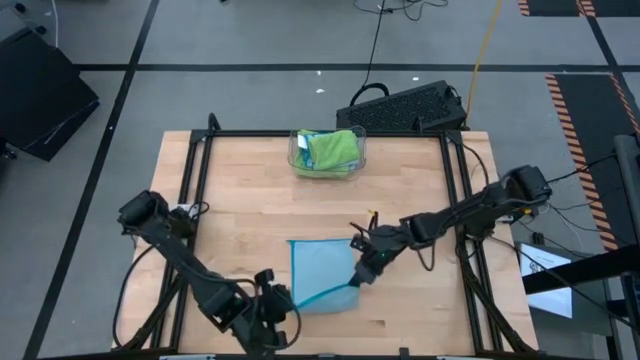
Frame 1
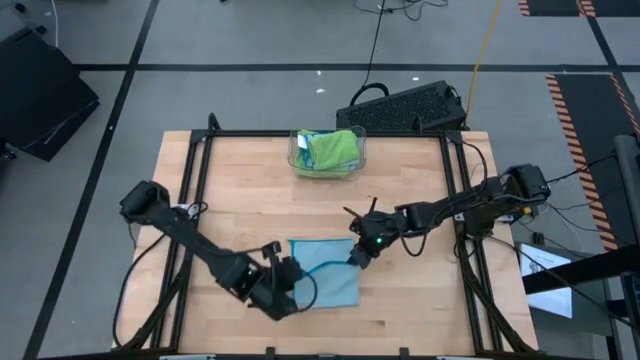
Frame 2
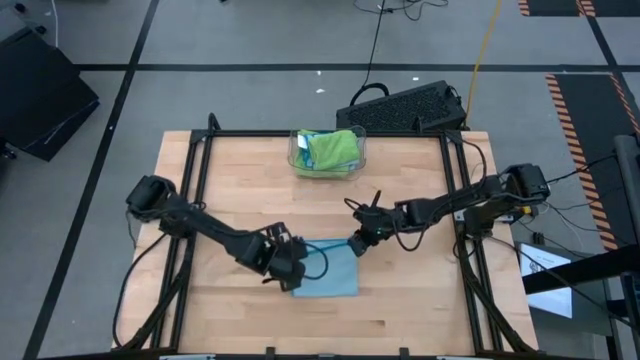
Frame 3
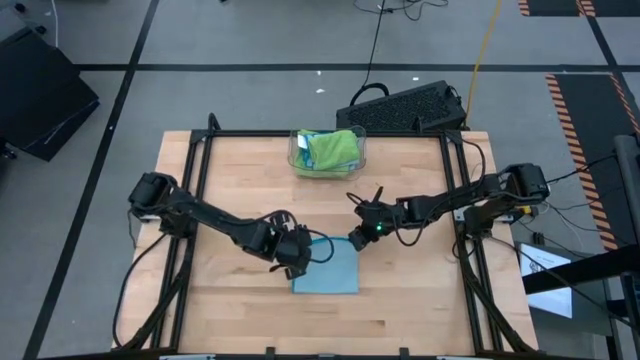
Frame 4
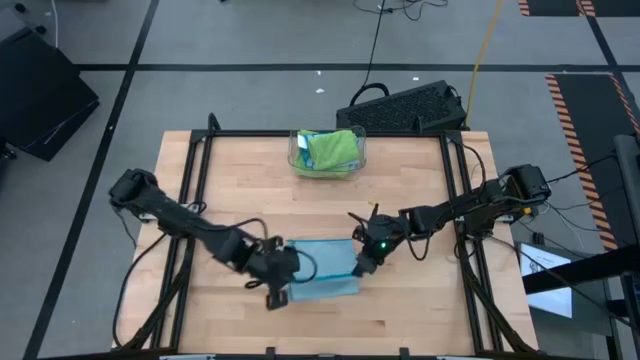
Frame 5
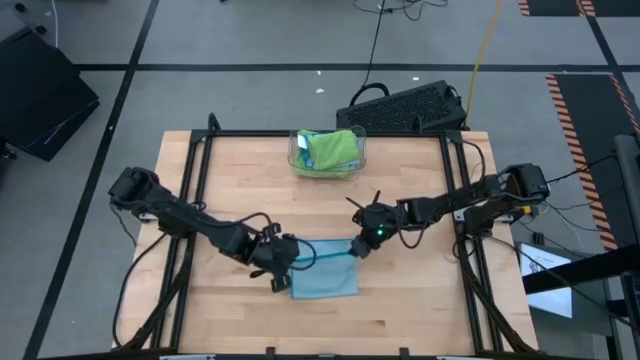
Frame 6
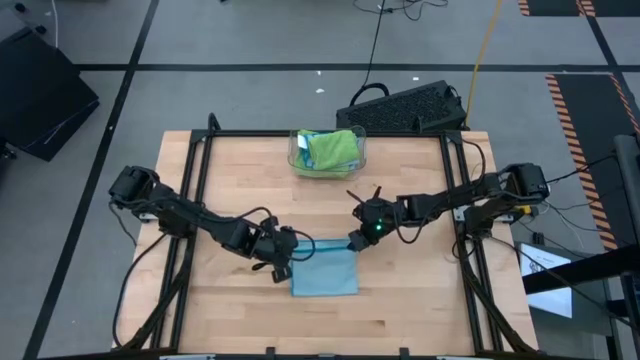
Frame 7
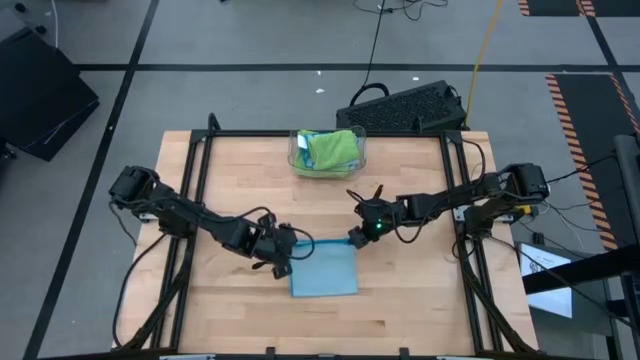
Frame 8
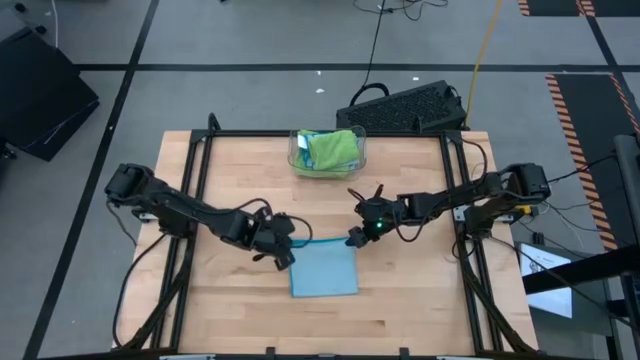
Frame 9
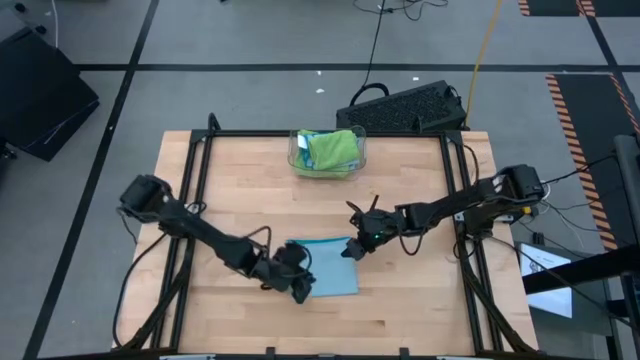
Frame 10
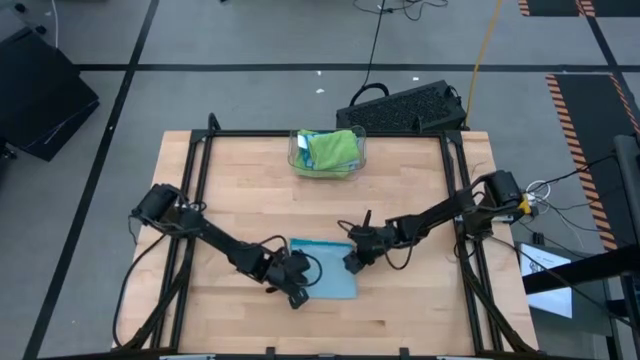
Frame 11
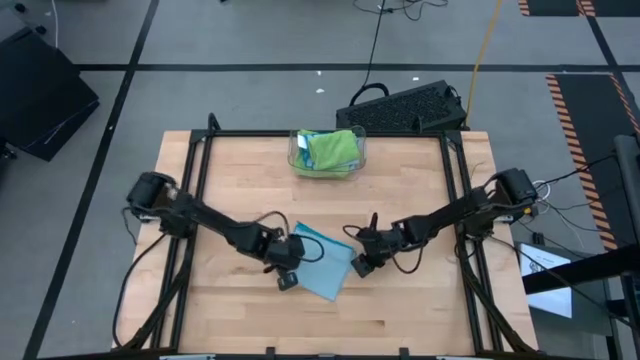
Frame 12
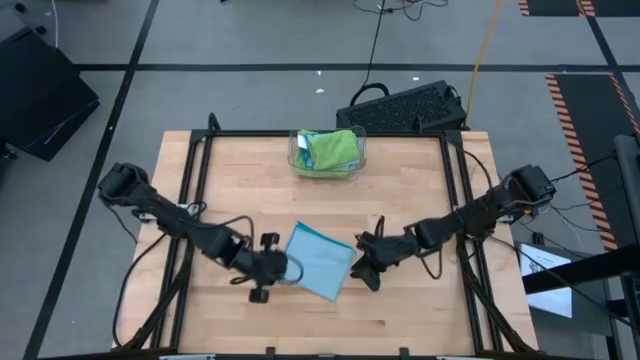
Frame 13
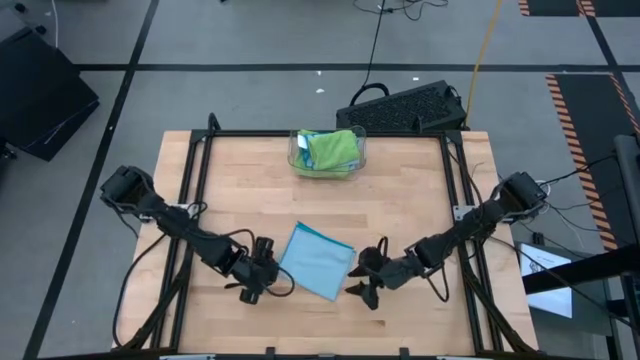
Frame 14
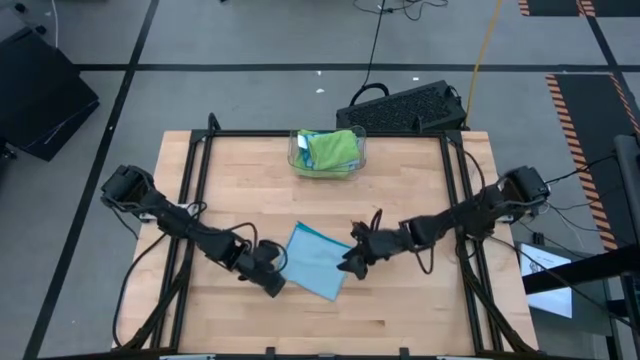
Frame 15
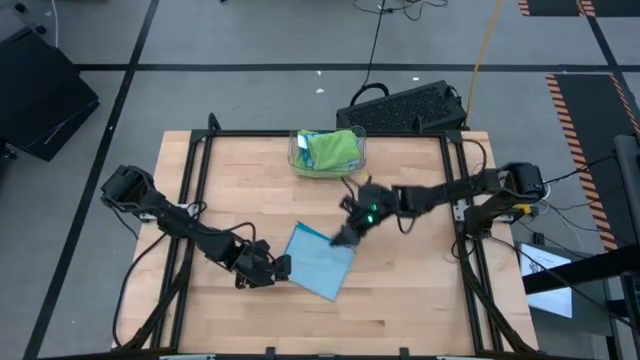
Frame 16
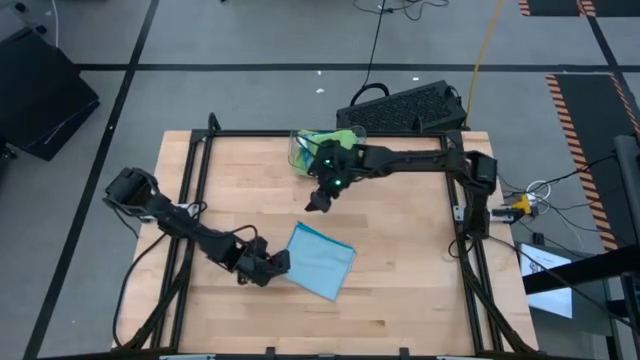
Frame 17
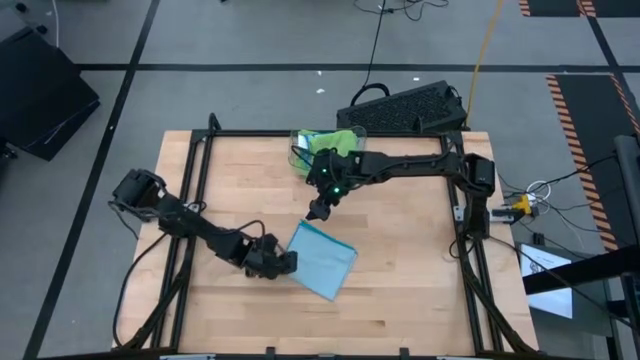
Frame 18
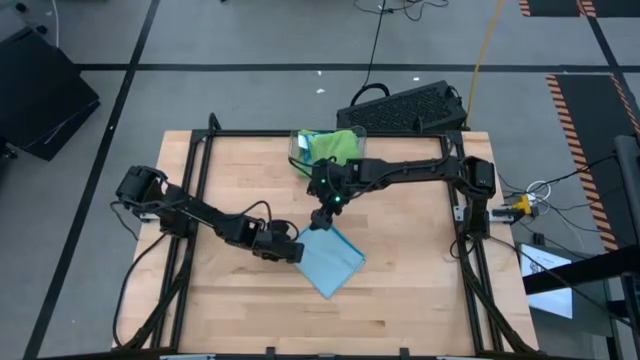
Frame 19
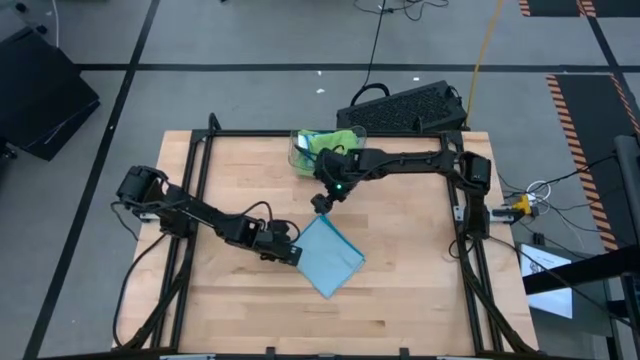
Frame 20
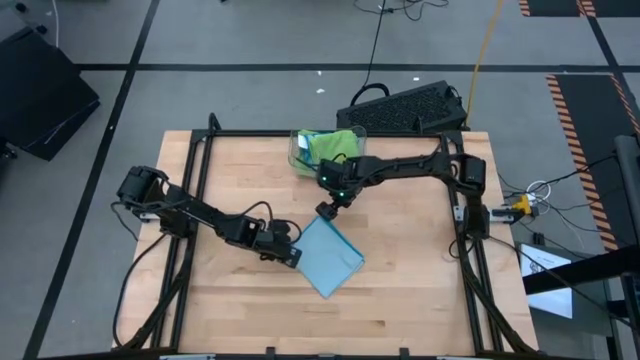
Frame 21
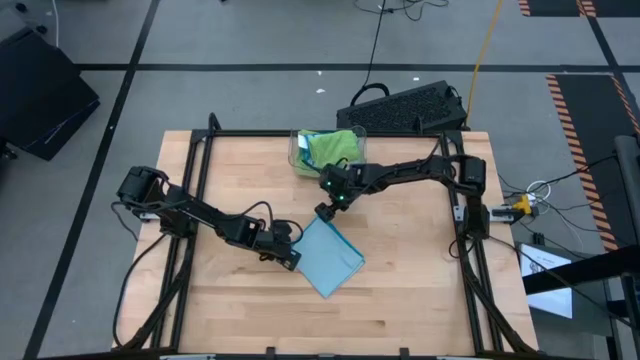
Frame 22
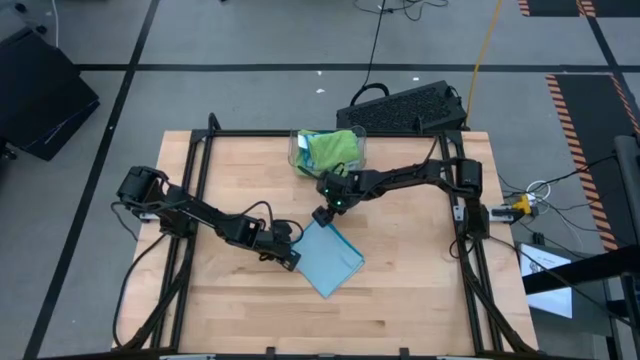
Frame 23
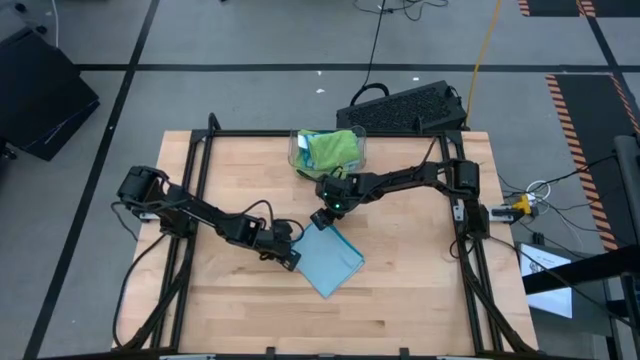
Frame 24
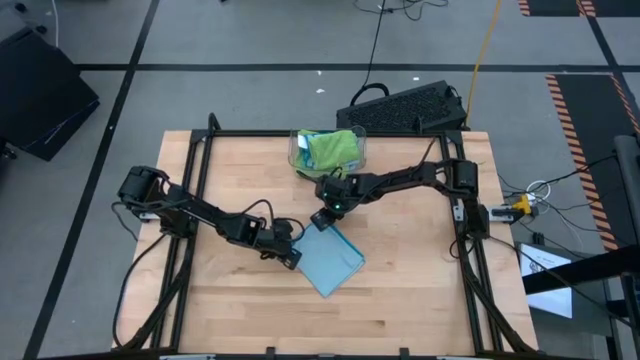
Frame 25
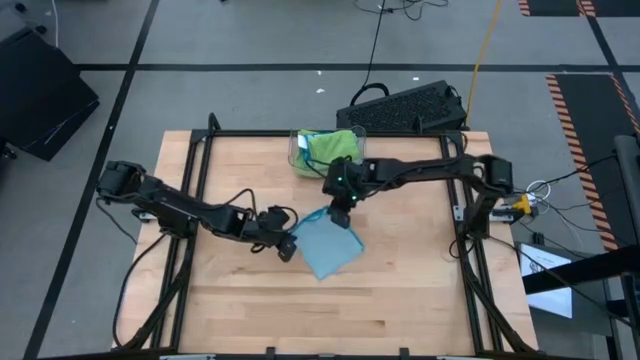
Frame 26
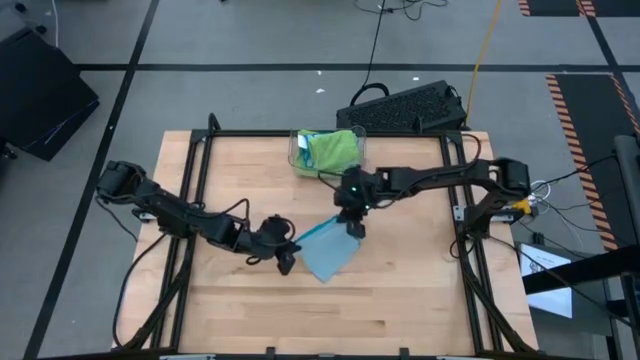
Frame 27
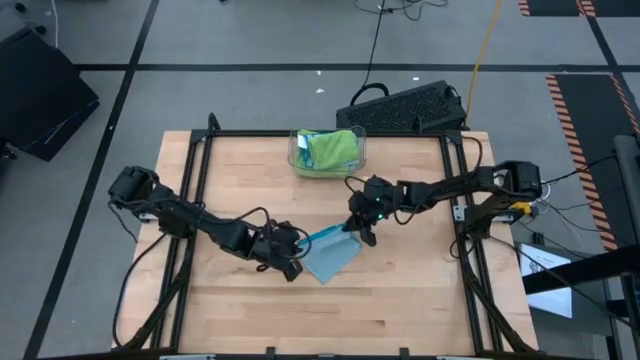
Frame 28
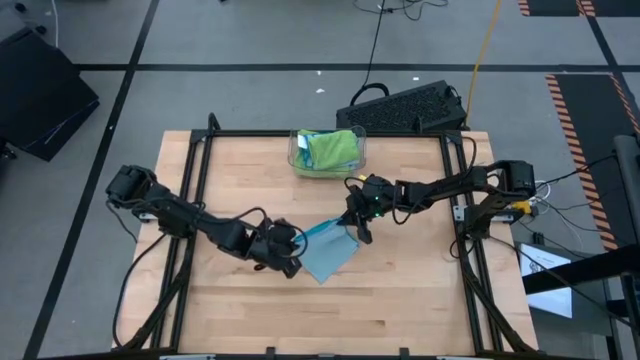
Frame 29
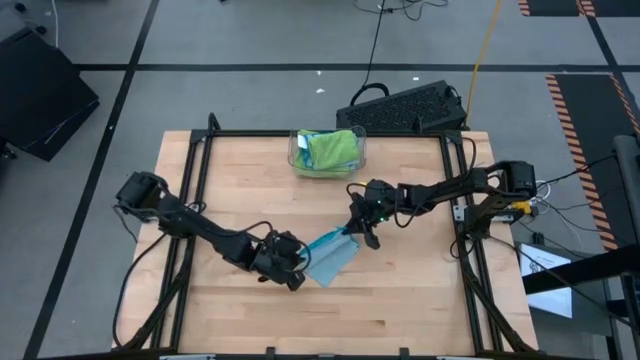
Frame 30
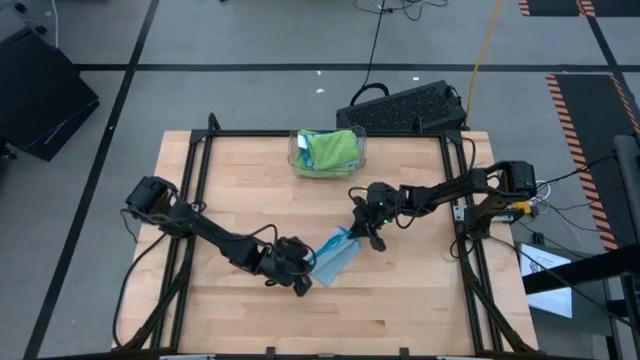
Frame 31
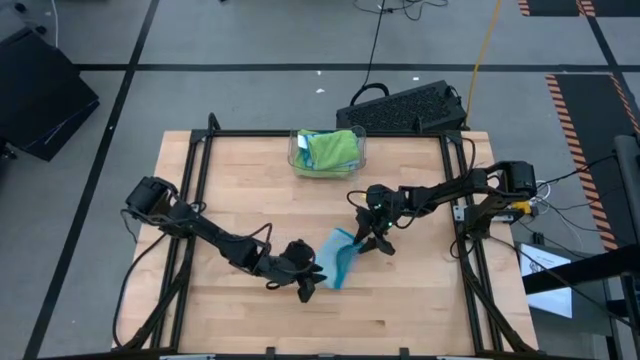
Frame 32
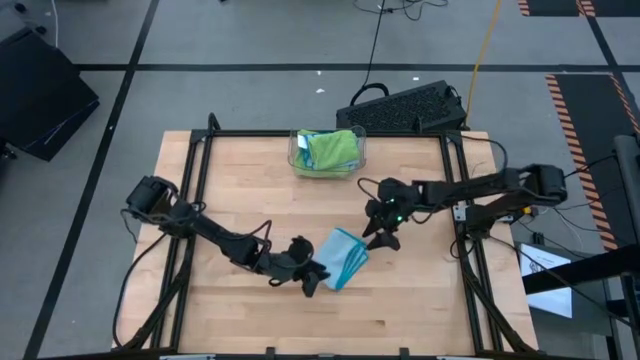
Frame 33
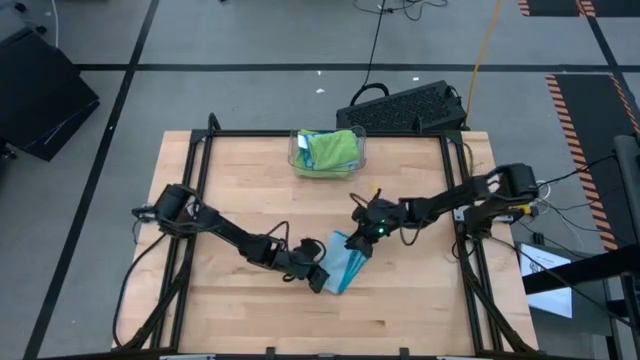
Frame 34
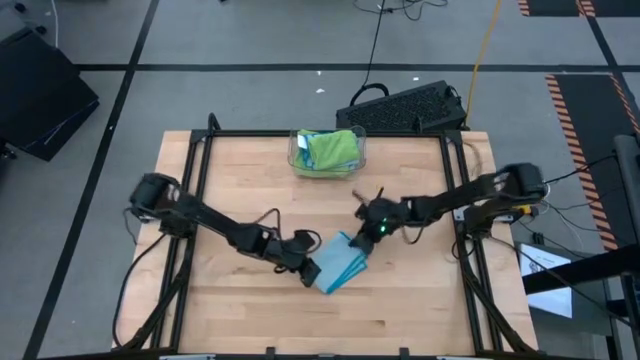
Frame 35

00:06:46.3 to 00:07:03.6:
Task: Fold microfiber towels
Fold the blue microfiber cloth

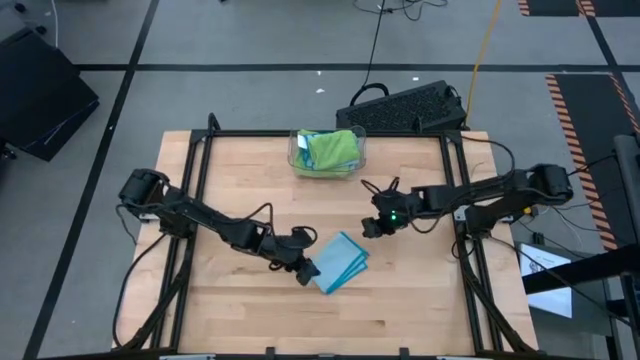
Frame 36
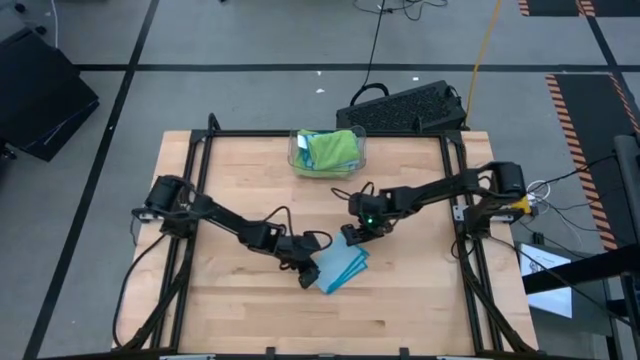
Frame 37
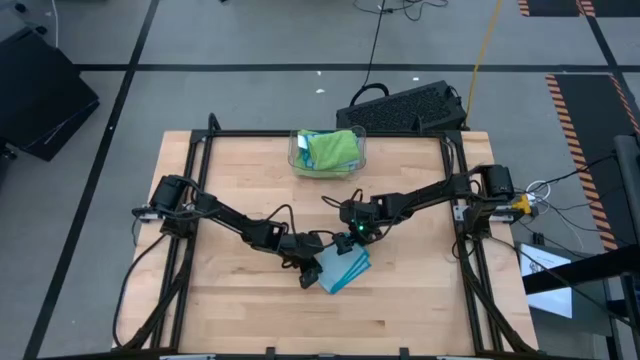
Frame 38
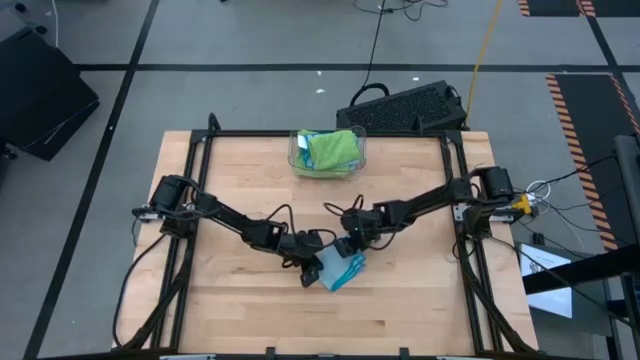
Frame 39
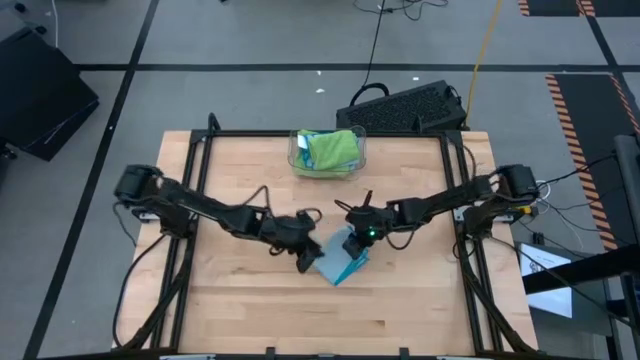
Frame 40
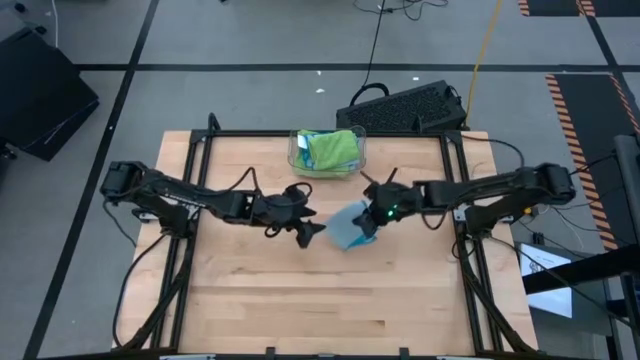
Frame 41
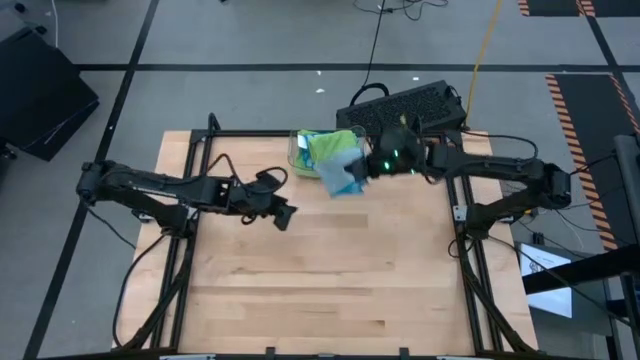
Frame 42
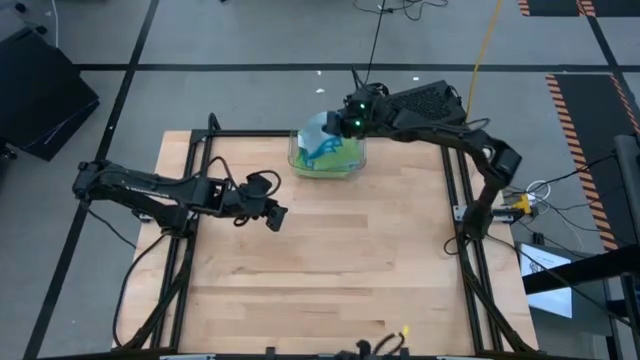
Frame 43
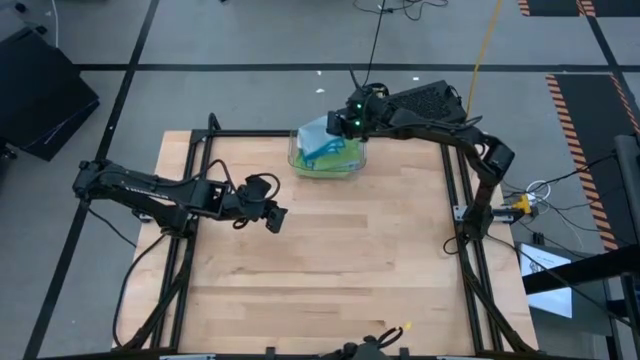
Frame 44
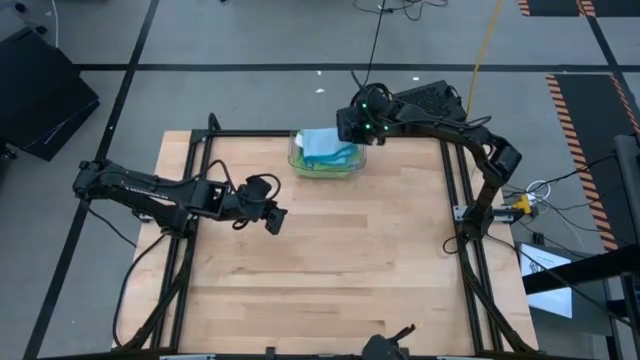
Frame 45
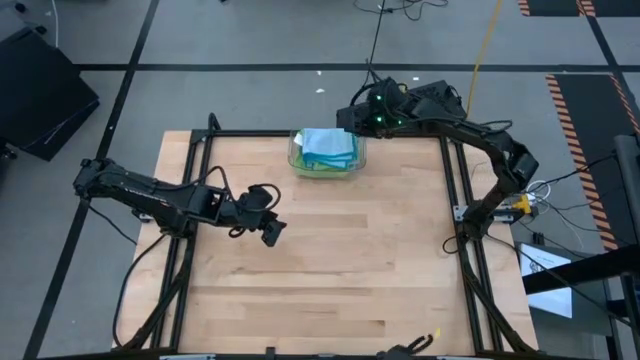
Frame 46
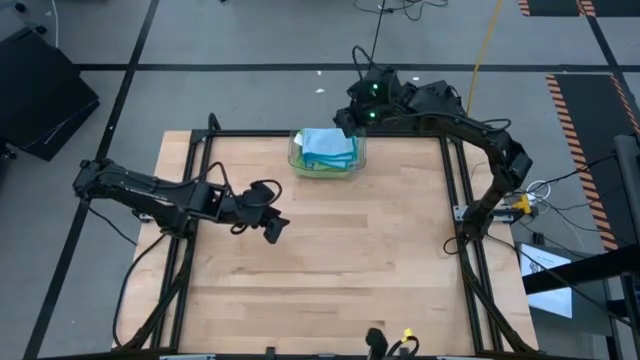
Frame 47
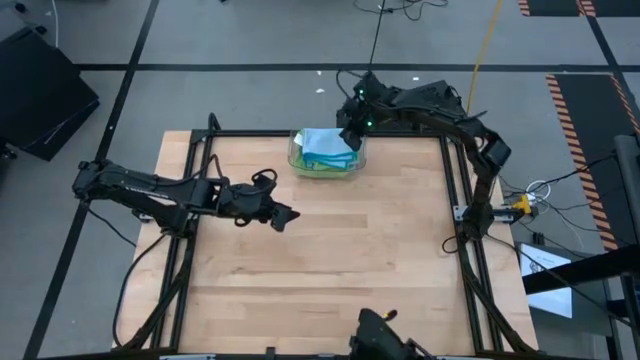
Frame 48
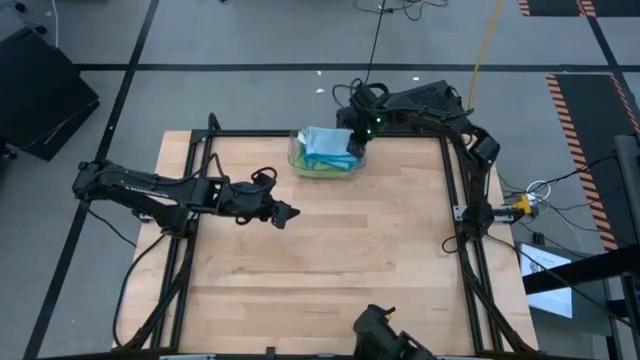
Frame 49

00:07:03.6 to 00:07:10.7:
Put the blue folded microfiber cloth into the transparent bin
